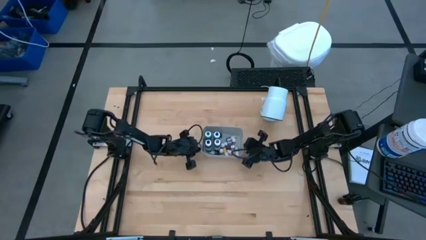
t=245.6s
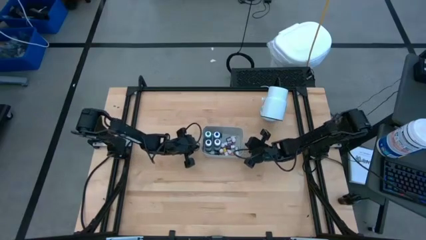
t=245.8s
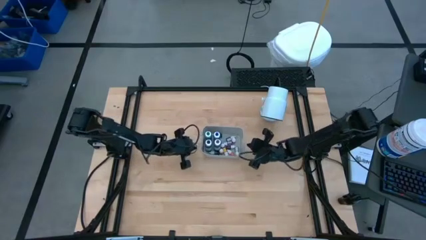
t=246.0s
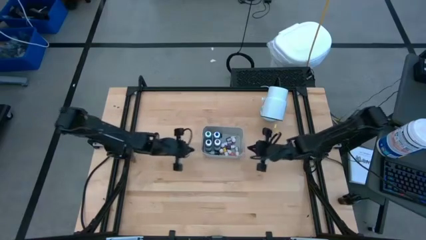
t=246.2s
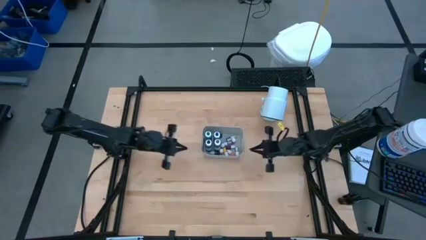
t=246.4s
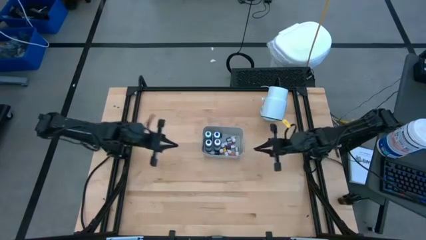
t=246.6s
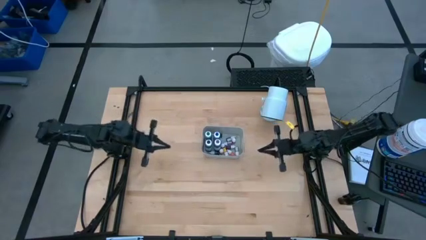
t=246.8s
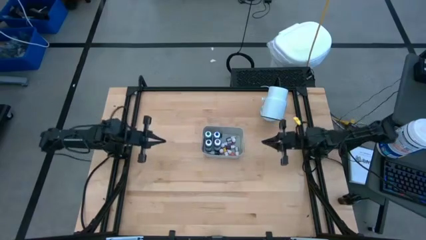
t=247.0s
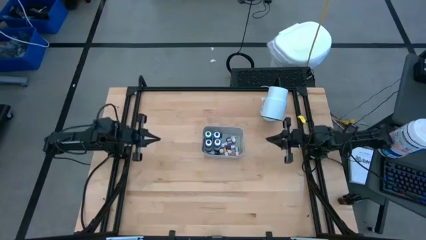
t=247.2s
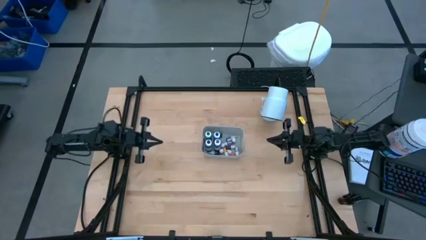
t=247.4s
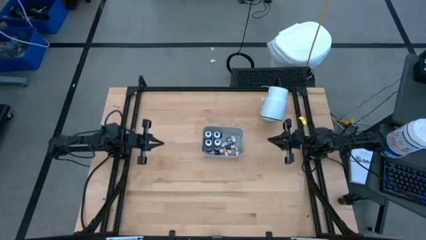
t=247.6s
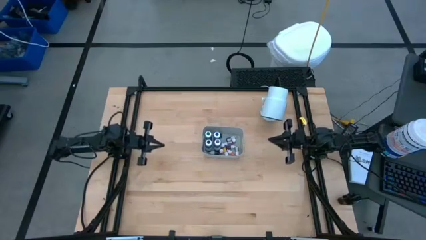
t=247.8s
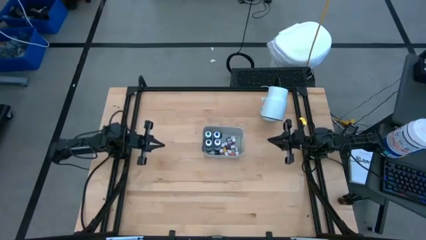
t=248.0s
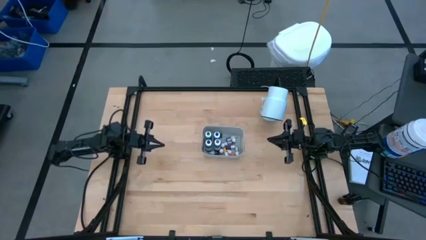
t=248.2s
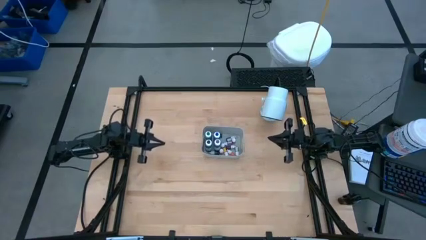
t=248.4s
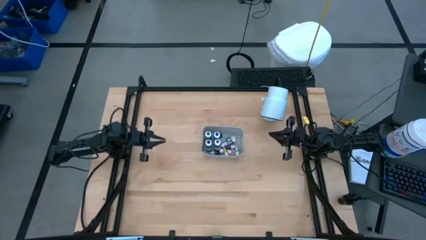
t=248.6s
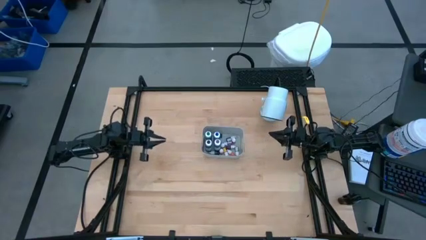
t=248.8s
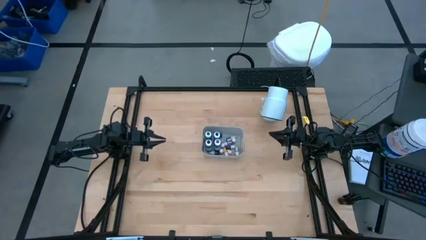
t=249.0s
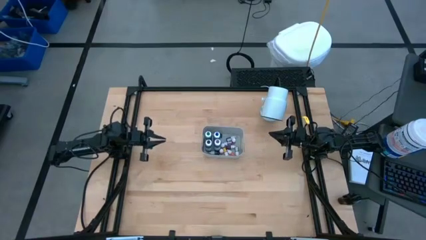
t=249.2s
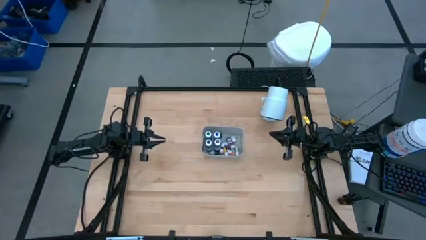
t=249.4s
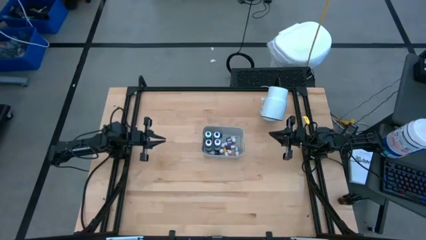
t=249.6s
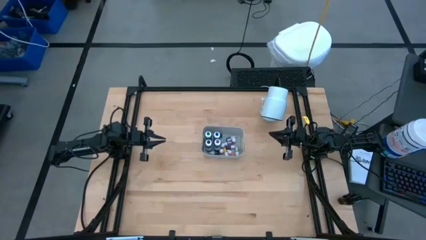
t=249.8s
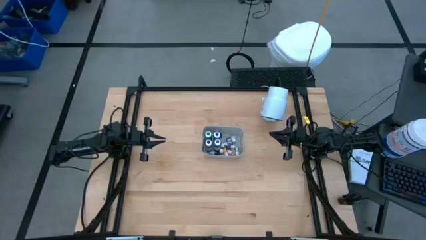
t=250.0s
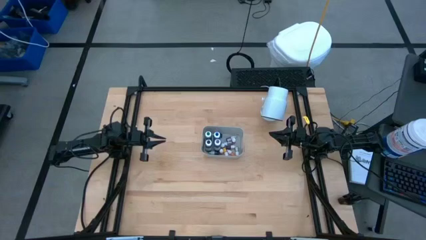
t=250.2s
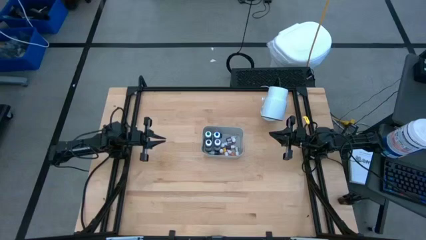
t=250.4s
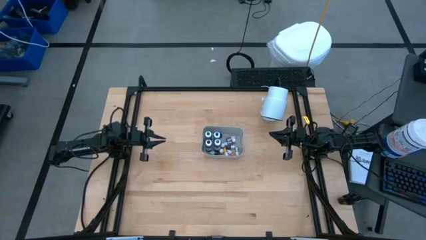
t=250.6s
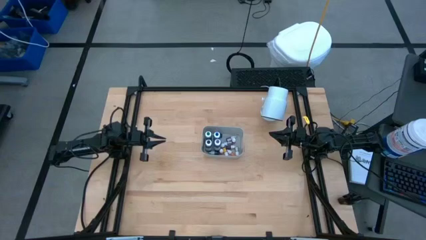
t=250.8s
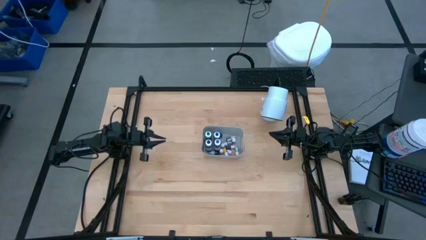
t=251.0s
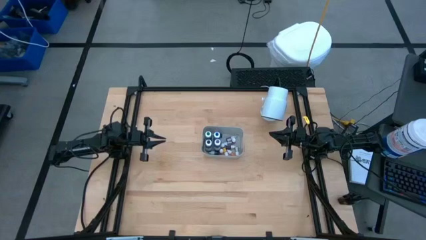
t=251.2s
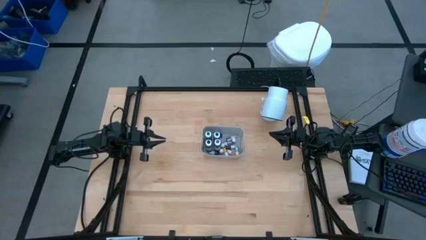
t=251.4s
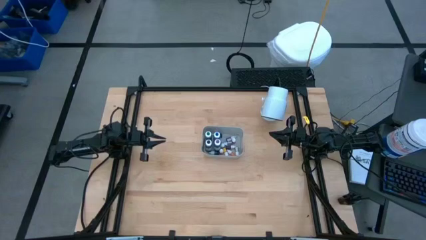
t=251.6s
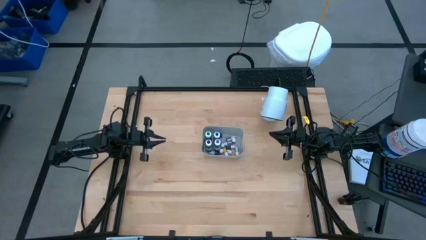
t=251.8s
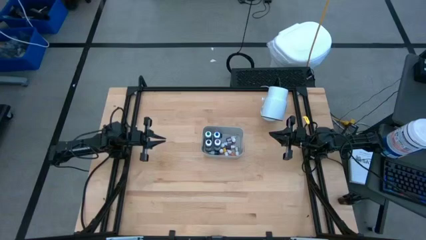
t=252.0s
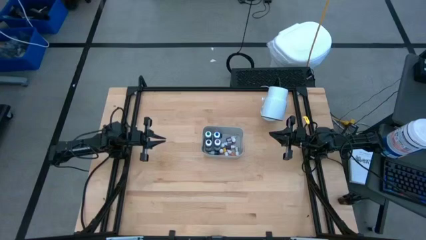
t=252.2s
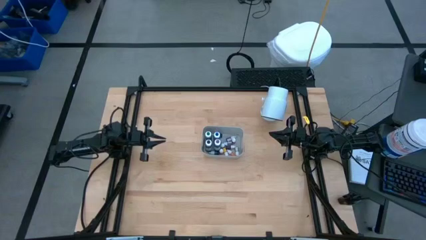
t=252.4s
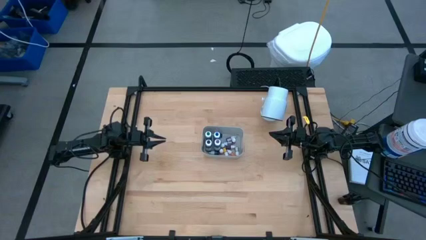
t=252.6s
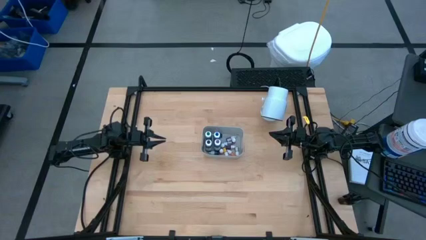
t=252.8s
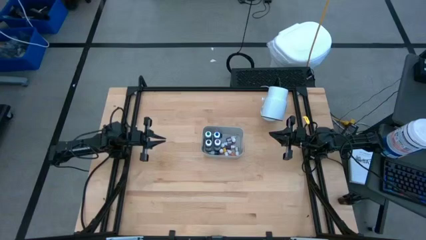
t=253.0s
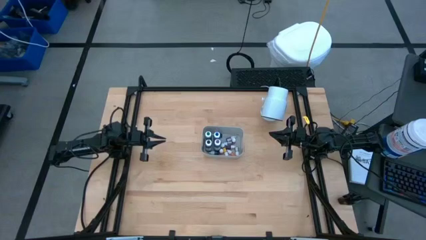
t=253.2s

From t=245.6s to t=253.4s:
Task: Pick & Place food coloring
Return to Home Position

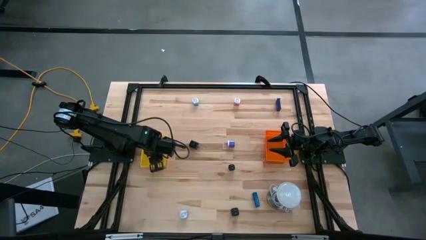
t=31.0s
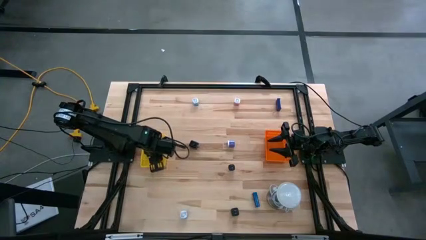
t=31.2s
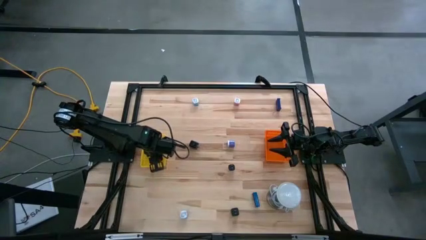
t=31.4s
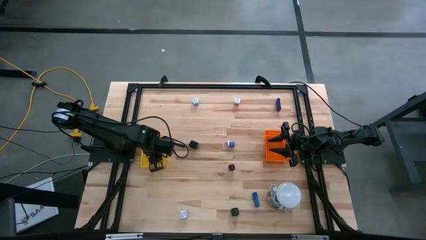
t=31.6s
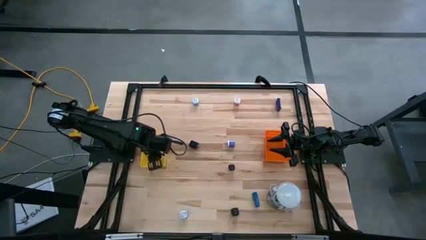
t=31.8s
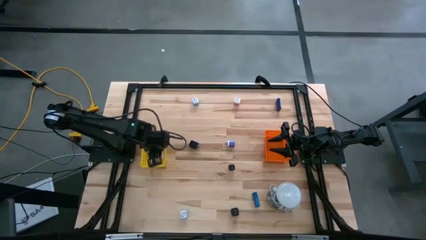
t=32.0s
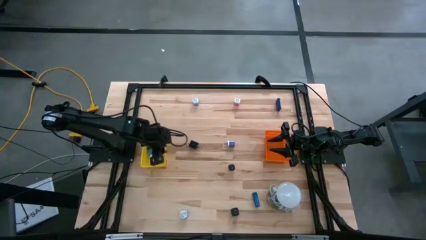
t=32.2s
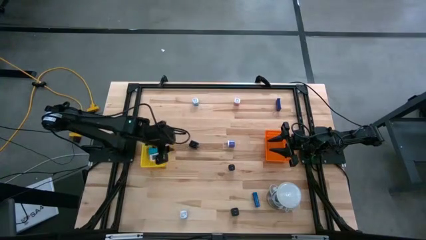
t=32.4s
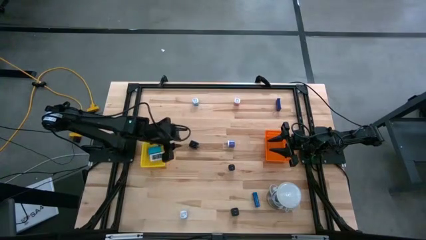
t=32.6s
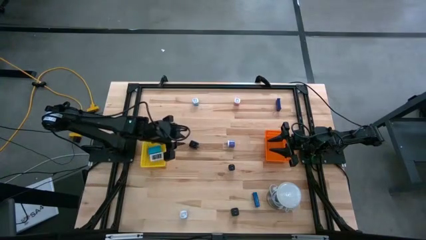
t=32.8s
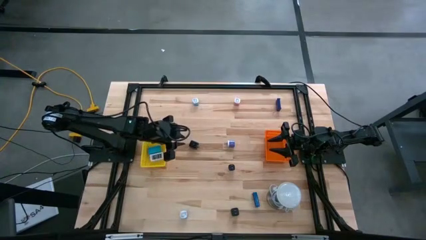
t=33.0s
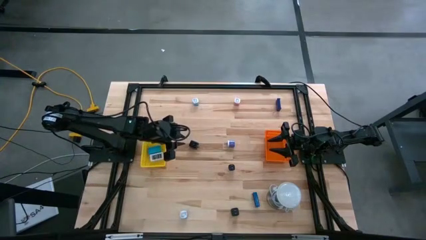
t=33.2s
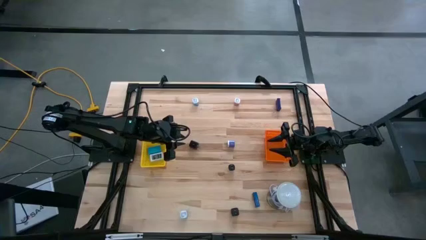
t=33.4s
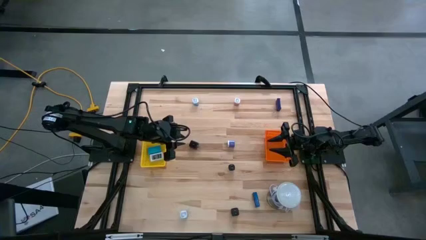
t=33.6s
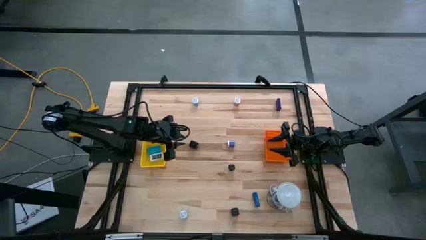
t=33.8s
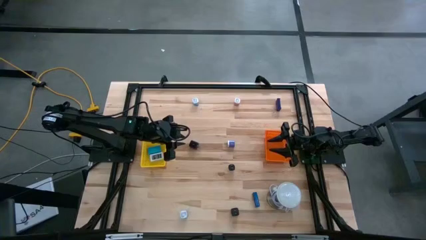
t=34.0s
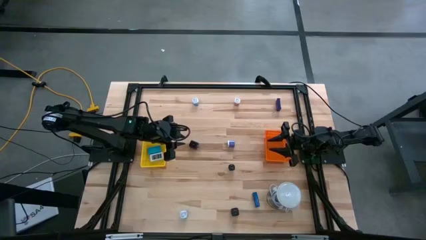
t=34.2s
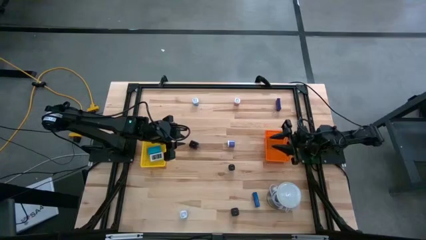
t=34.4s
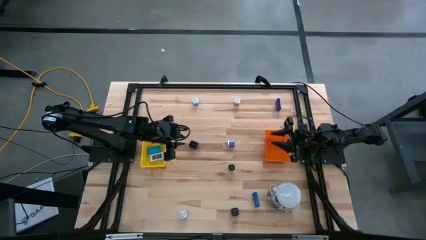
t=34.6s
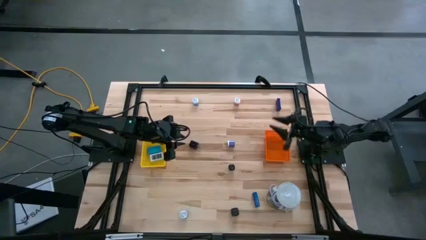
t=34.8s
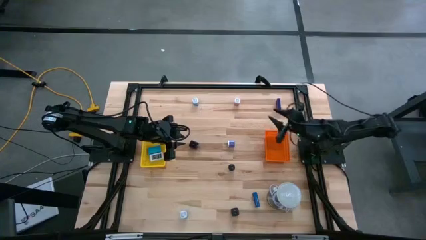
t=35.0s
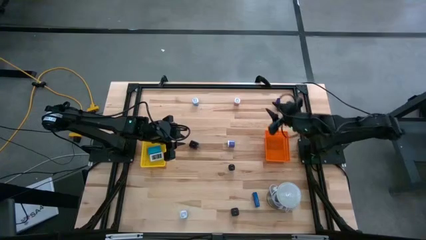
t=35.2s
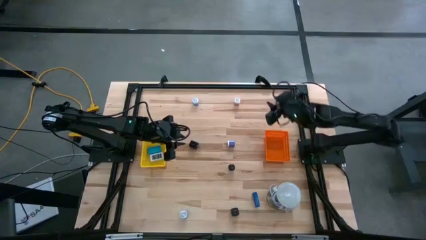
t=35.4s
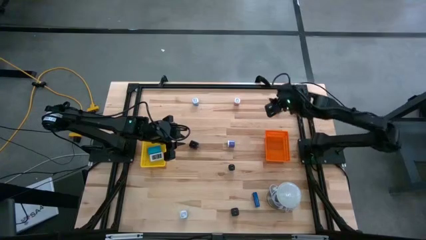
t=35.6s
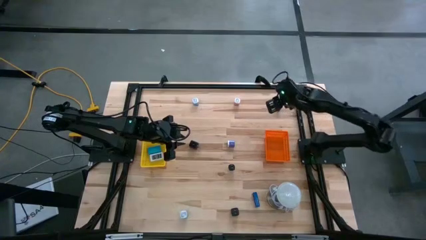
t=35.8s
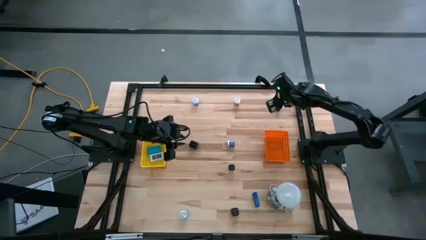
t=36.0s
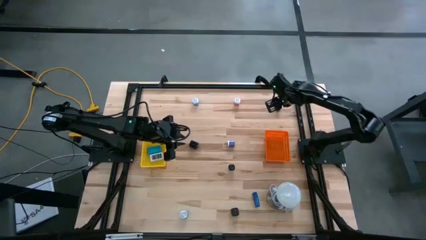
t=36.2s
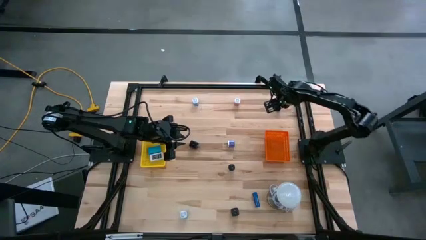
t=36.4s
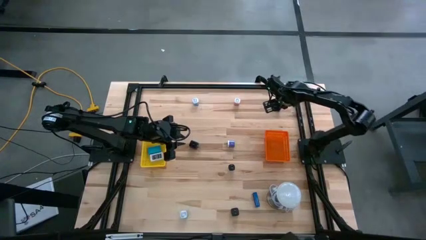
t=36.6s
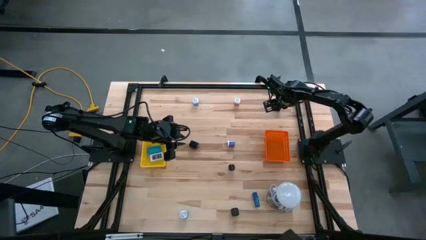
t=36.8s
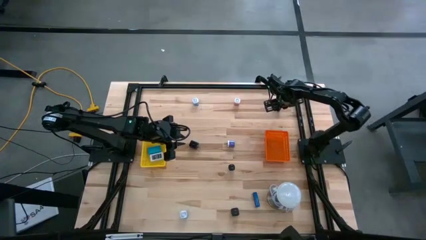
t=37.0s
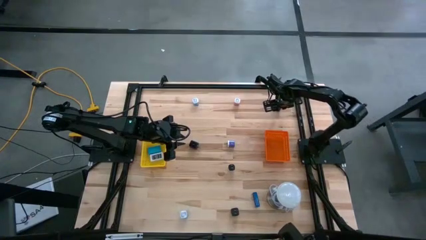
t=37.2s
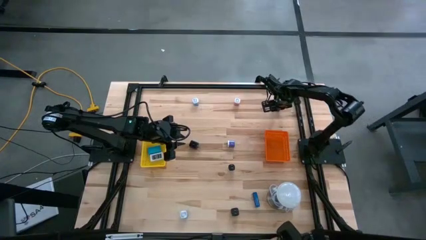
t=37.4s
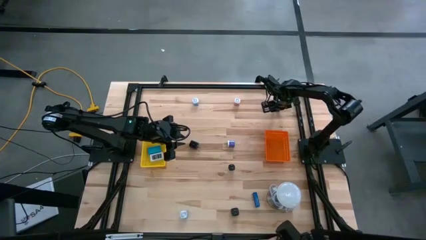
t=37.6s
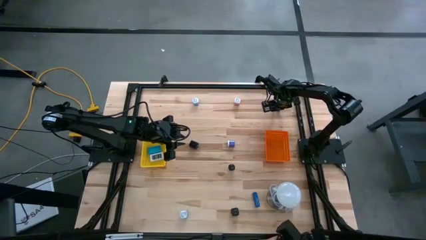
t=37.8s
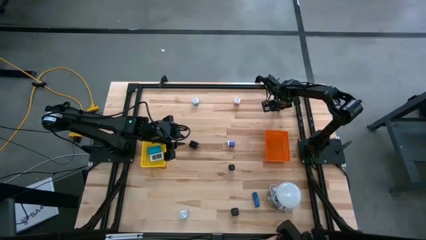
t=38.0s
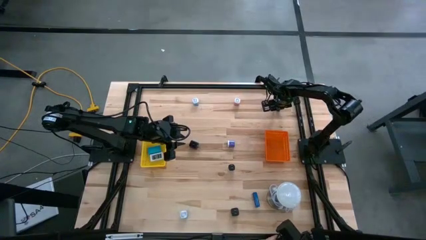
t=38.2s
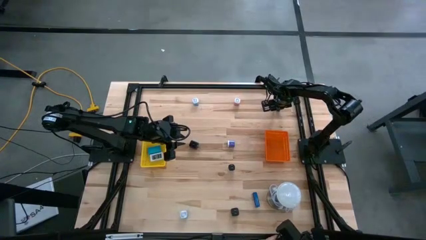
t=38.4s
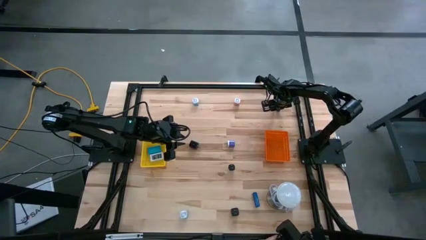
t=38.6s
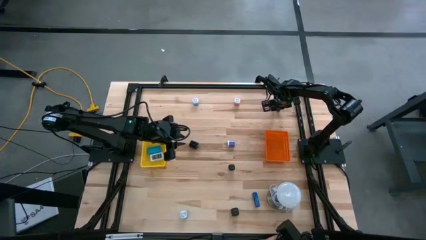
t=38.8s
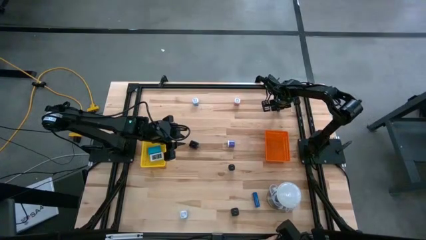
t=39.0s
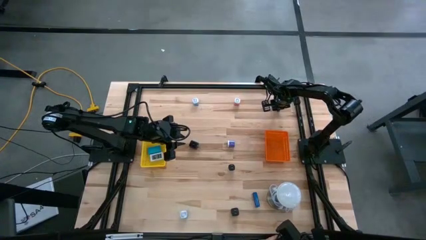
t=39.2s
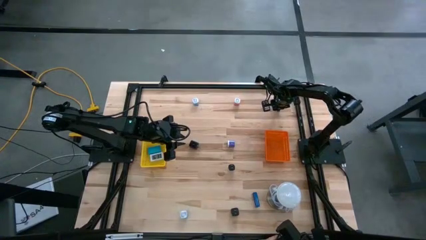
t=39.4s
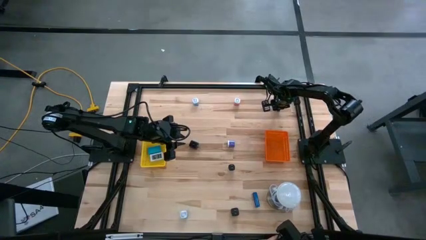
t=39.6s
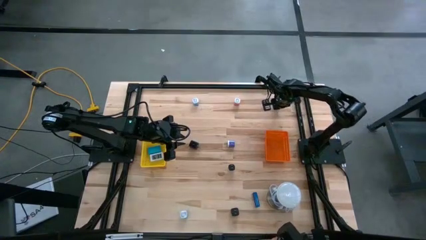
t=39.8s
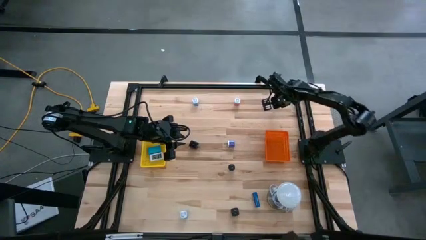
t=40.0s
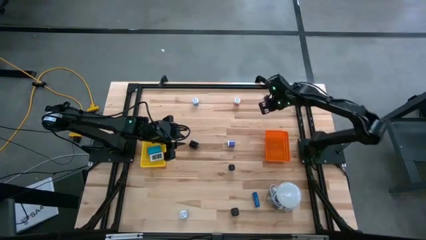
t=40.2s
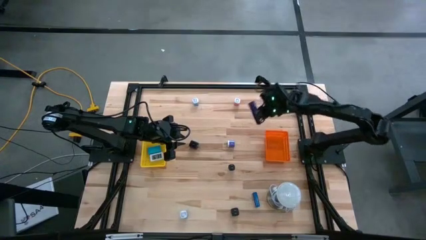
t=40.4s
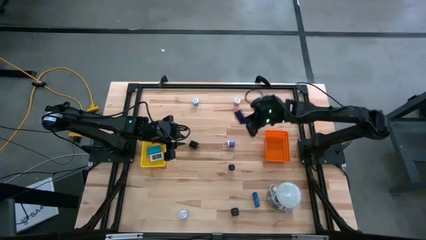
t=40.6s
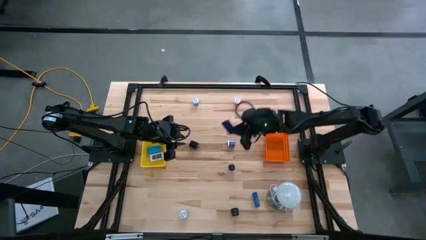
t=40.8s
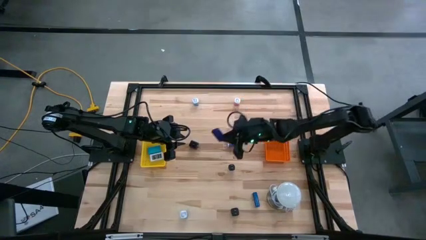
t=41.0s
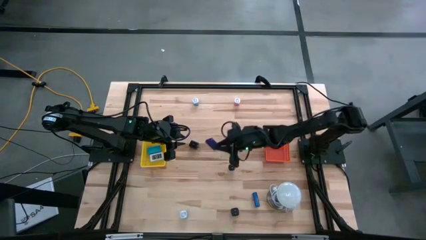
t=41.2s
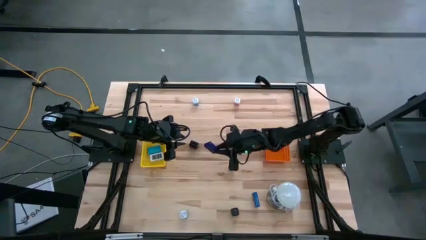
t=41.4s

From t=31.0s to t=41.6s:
Task: Pick & Place Office items
Put the dark blue digital timer into the yellow bin
